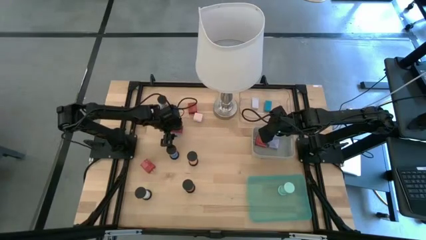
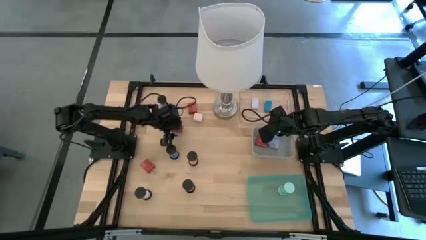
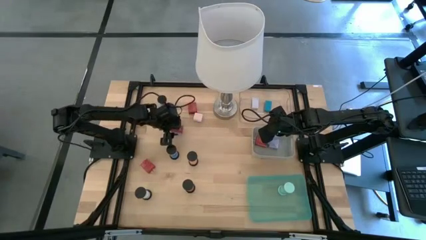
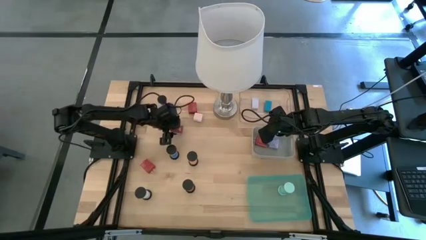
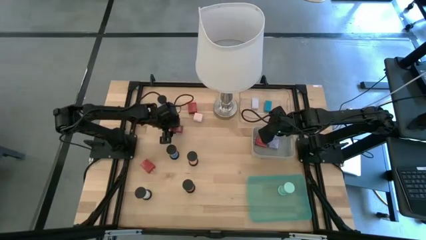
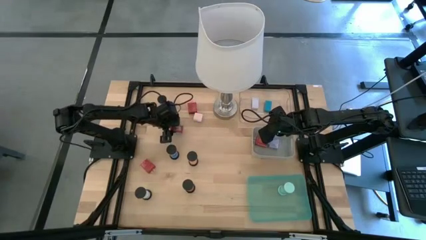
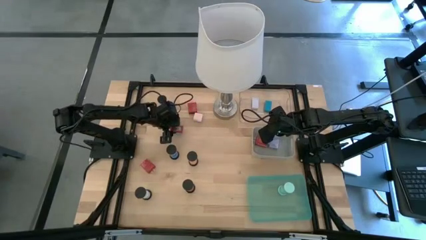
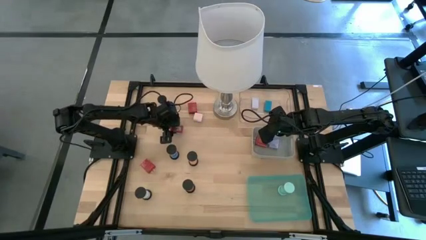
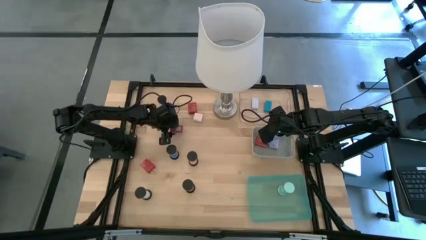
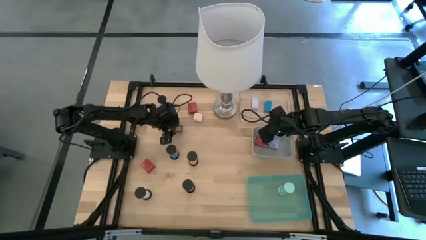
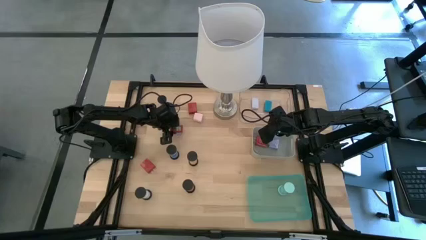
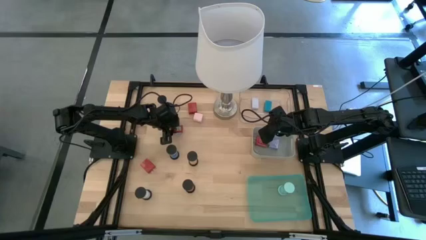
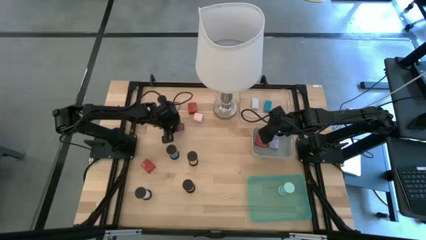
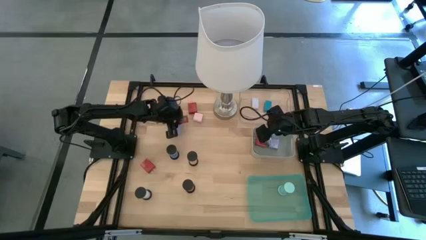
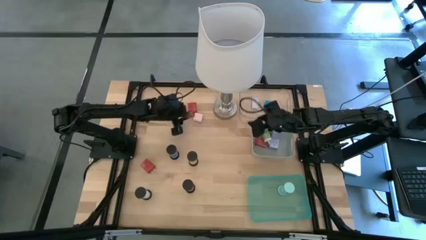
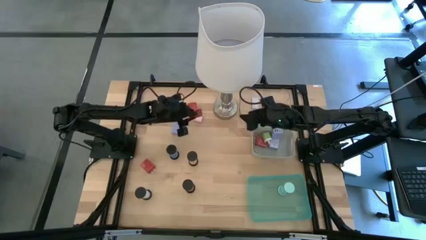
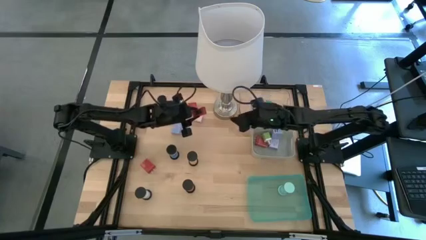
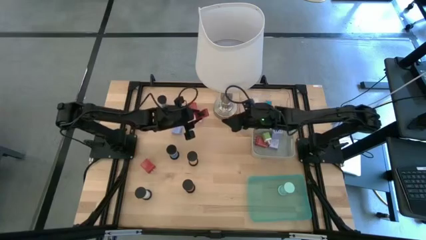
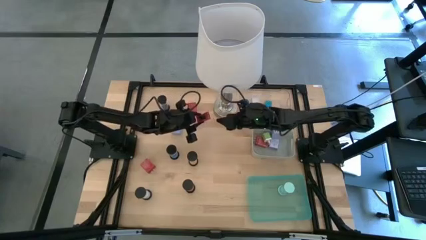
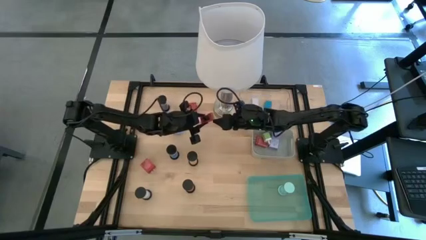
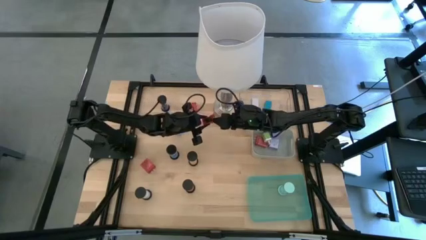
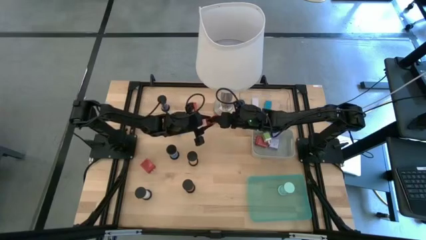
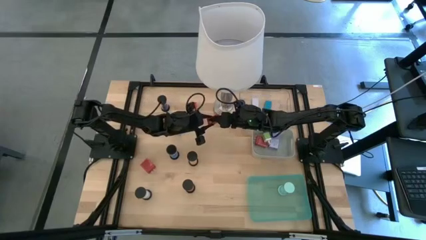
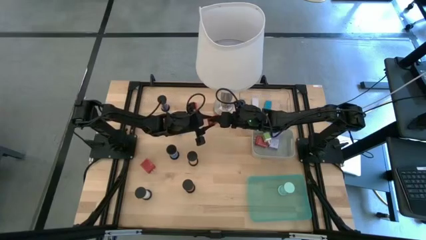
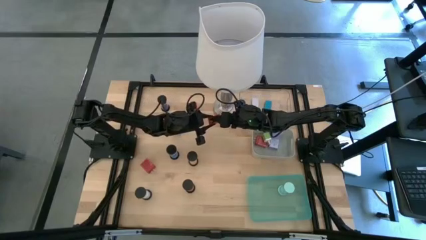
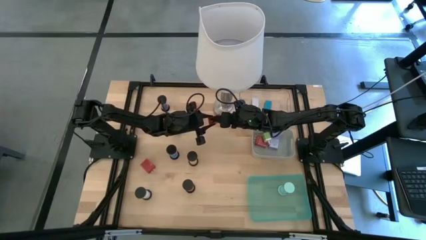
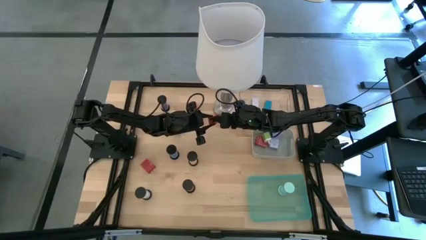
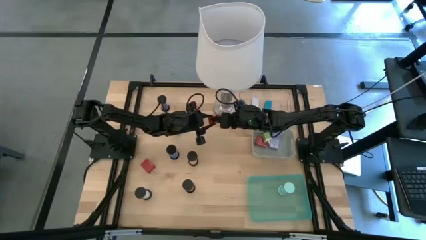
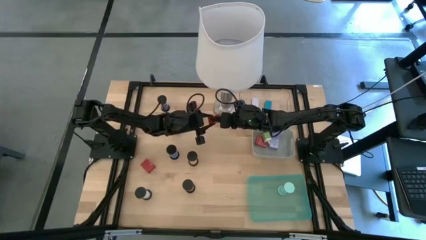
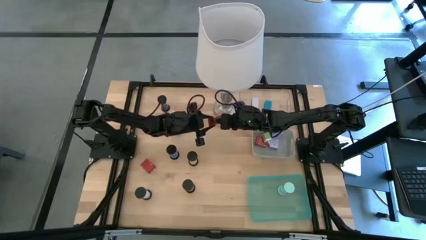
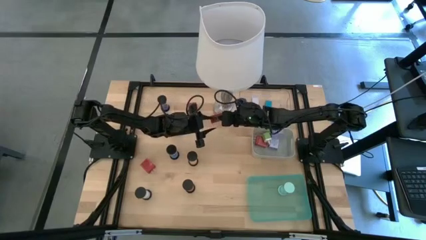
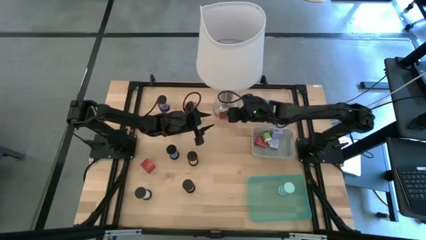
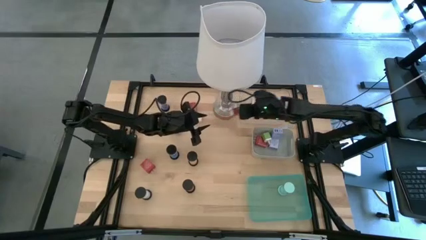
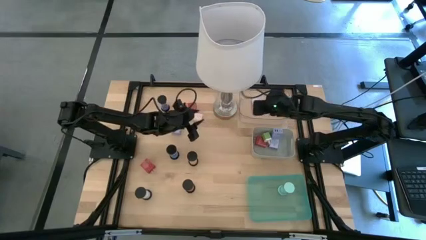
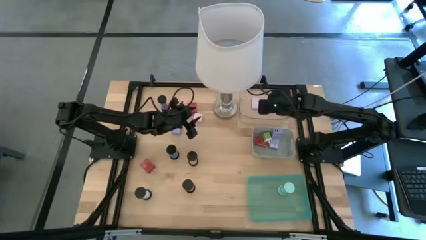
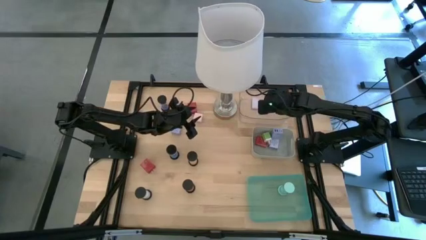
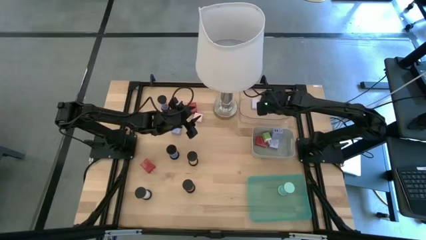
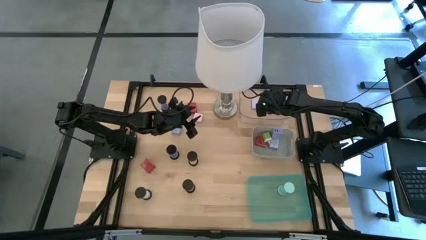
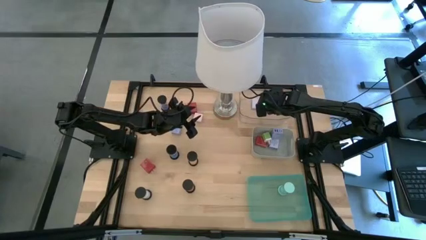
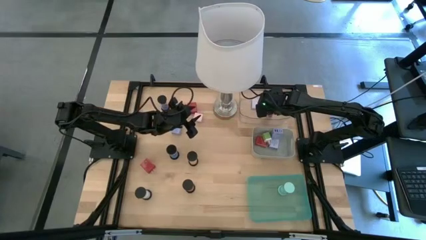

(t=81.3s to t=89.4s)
Task: Pick & Place Office items
Put the red timer into the transparent bin

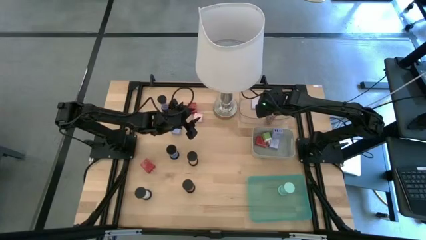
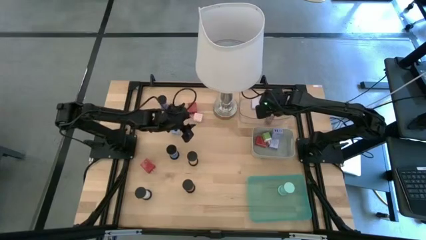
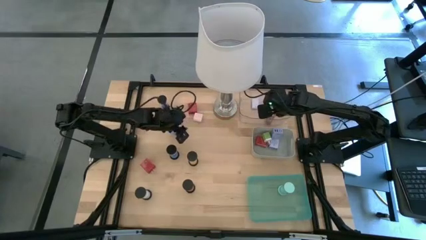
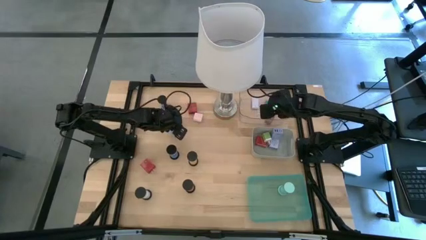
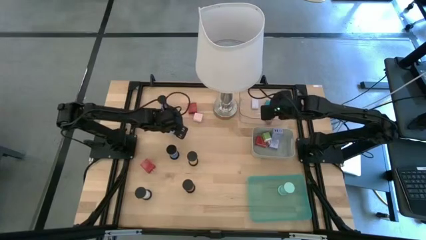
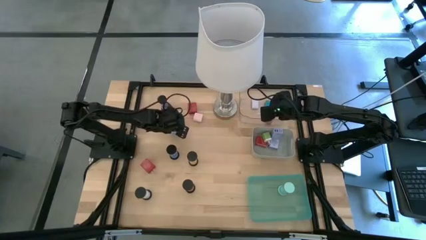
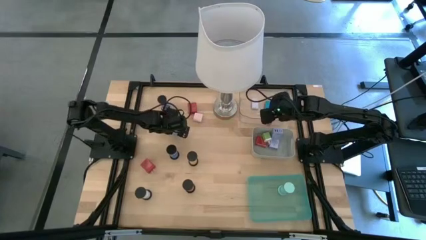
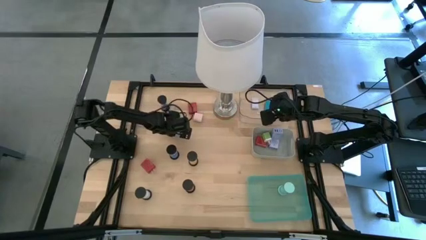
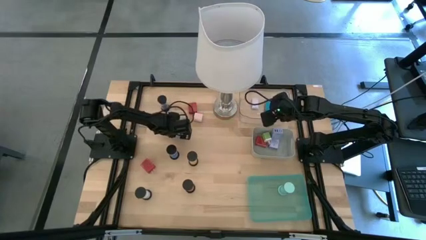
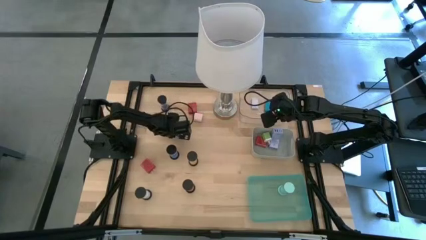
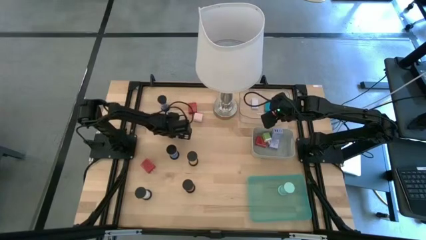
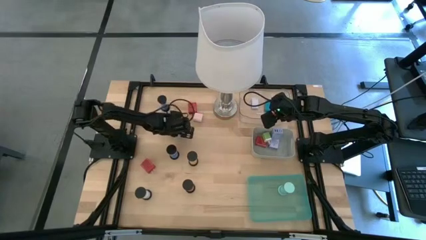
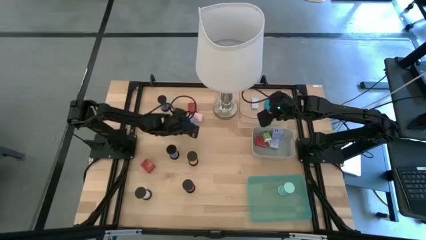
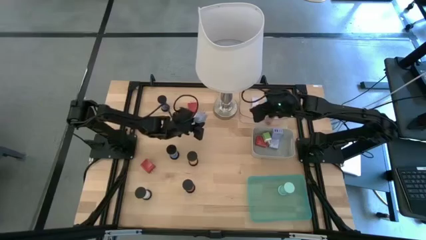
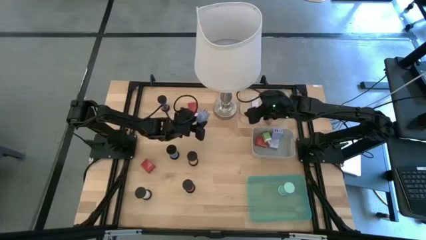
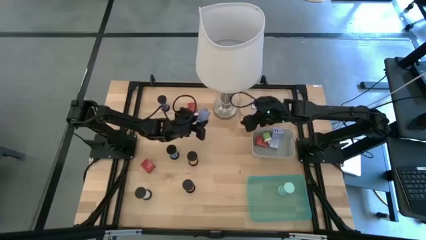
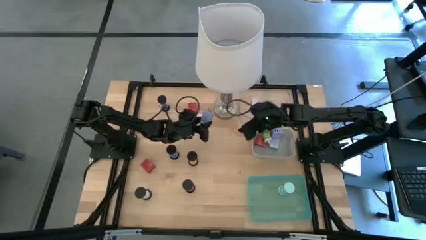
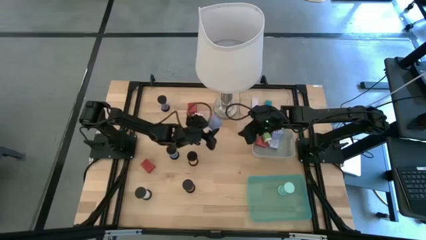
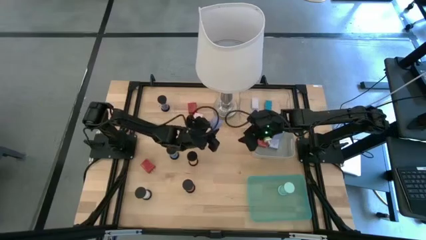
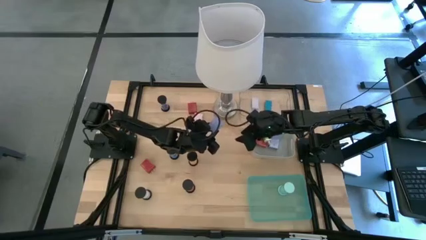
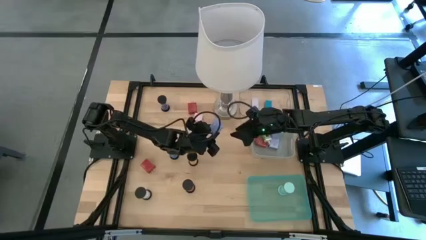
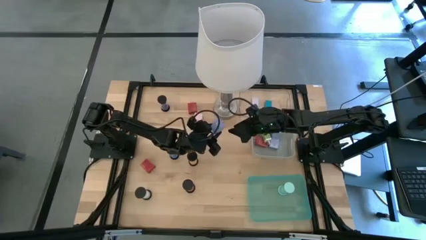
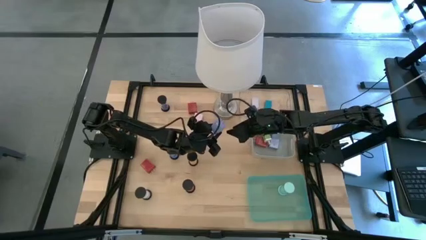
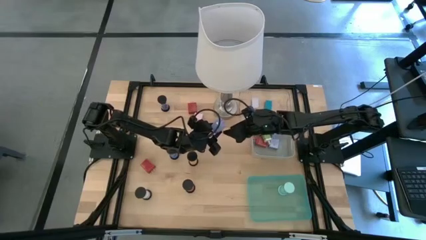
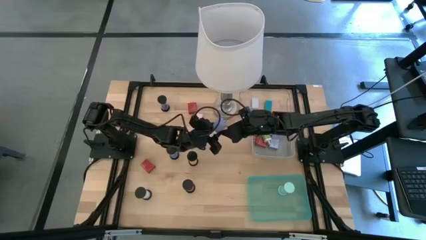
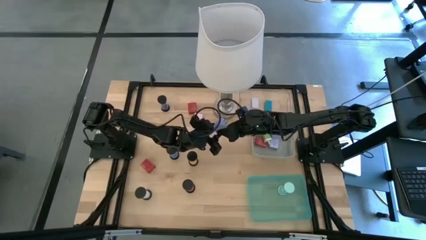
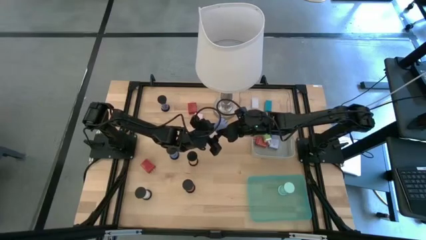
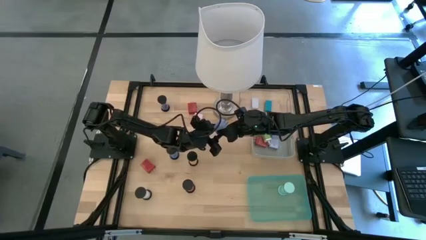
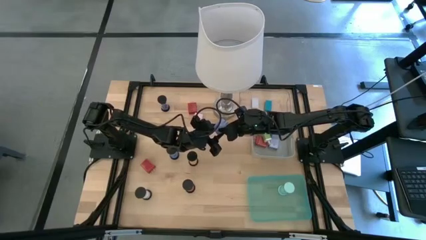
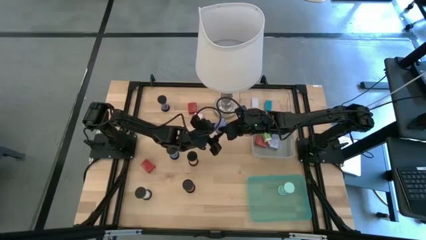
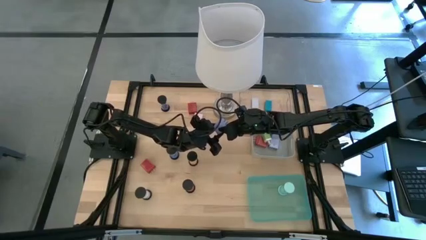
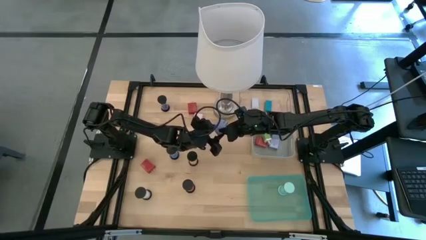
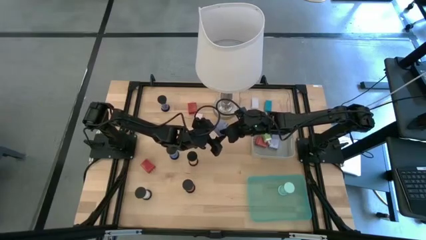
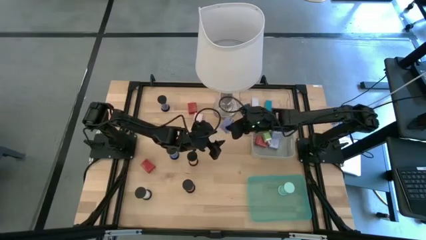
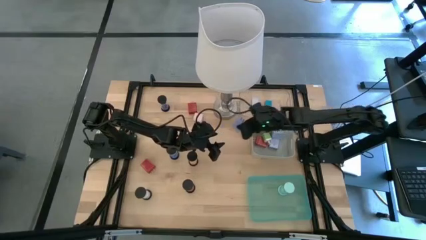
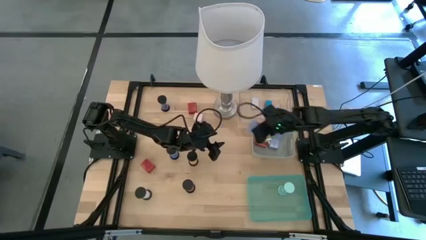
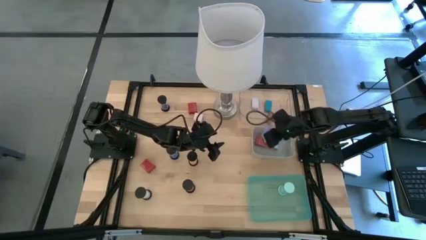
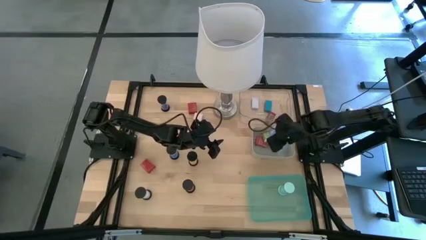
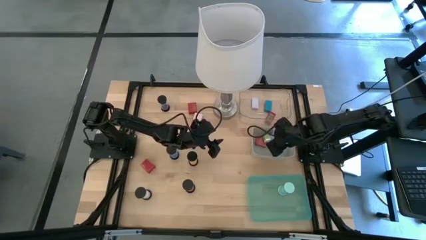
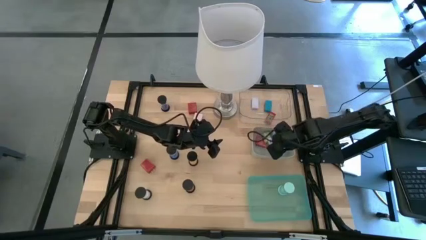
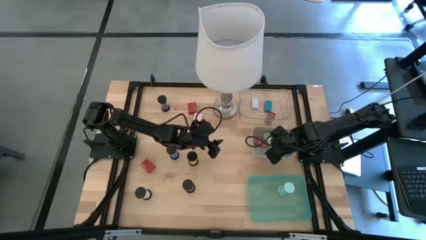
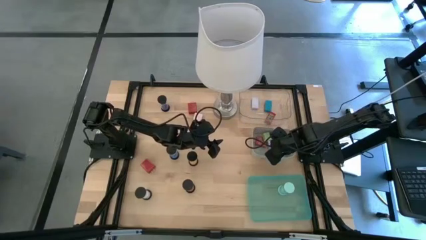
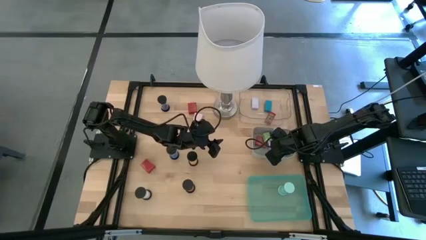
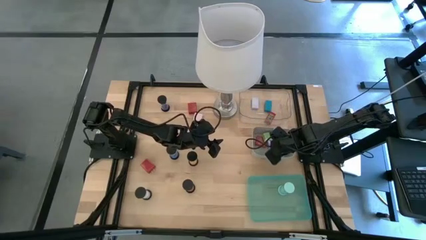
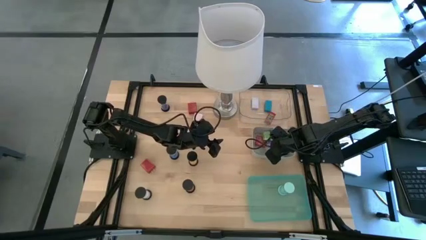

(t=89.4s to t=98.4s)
Put the purple charger adapter into the gray bin
